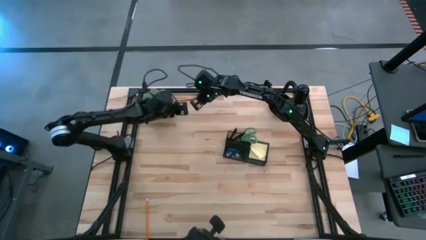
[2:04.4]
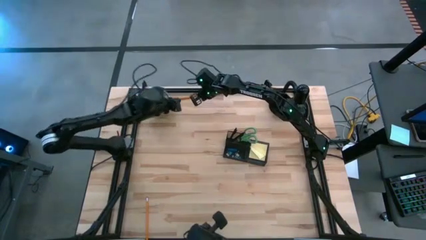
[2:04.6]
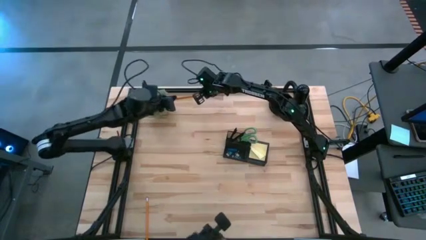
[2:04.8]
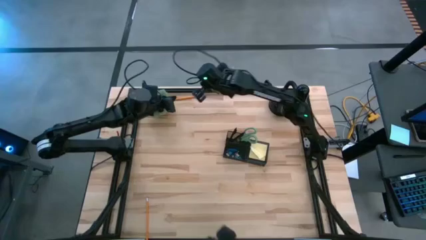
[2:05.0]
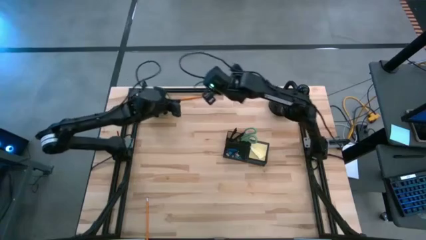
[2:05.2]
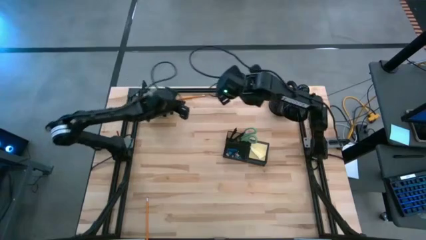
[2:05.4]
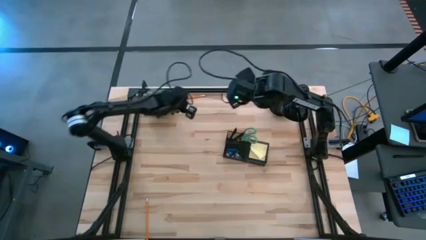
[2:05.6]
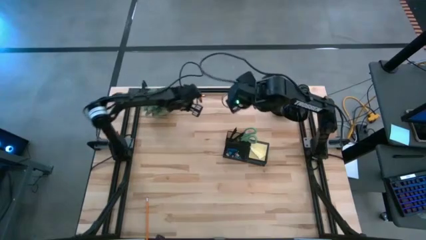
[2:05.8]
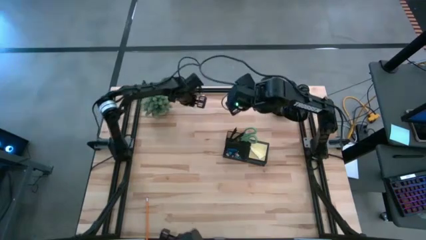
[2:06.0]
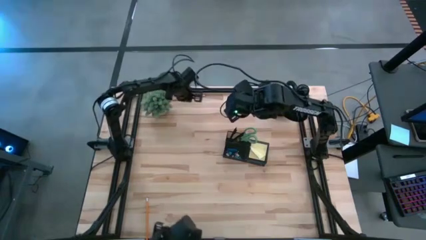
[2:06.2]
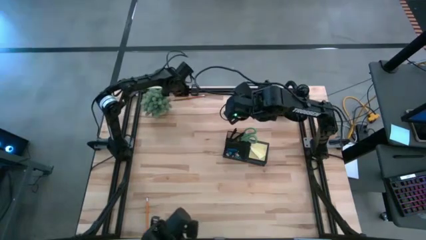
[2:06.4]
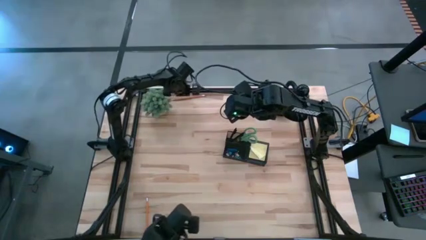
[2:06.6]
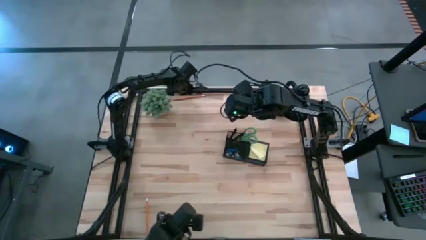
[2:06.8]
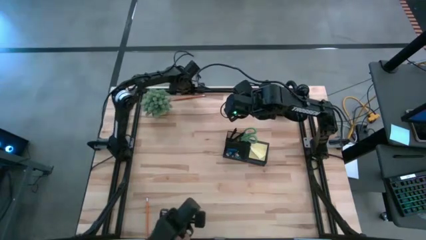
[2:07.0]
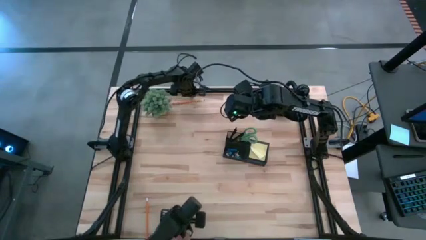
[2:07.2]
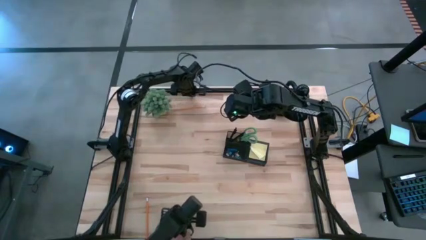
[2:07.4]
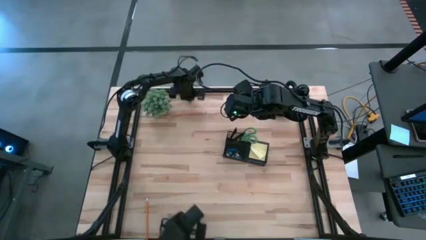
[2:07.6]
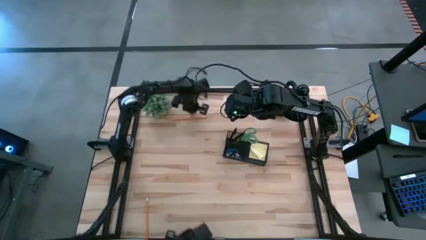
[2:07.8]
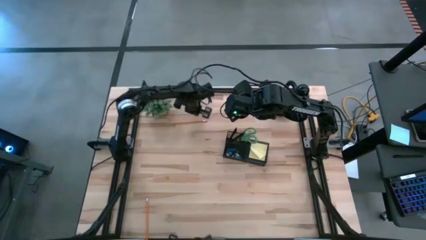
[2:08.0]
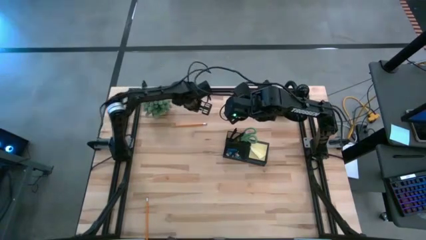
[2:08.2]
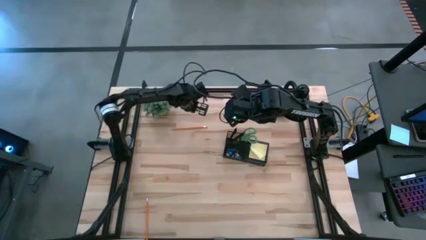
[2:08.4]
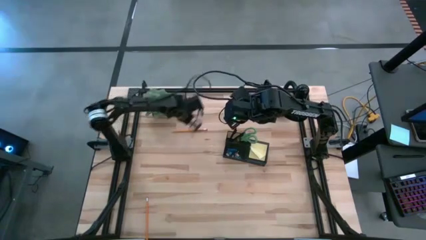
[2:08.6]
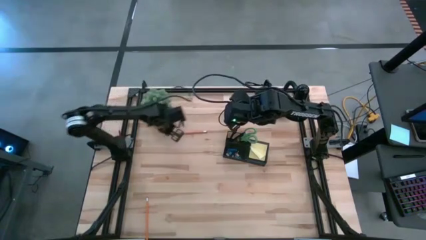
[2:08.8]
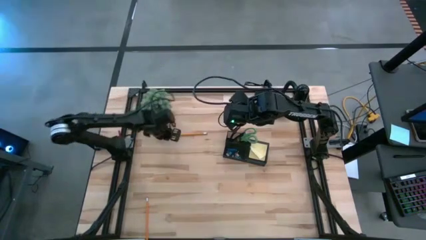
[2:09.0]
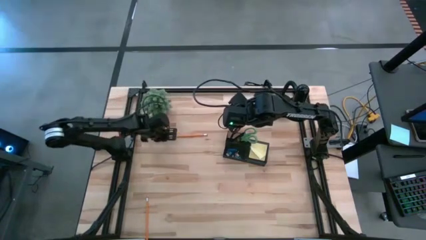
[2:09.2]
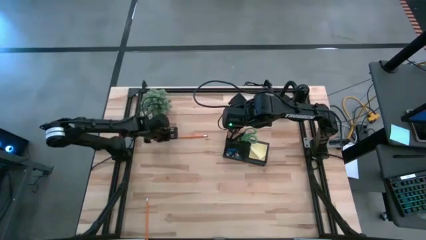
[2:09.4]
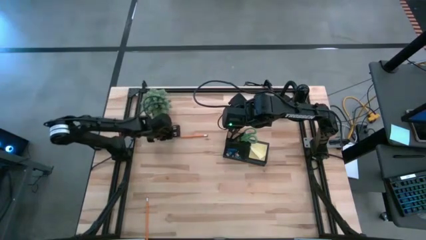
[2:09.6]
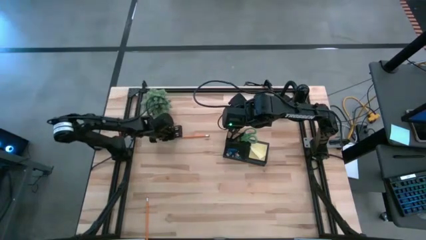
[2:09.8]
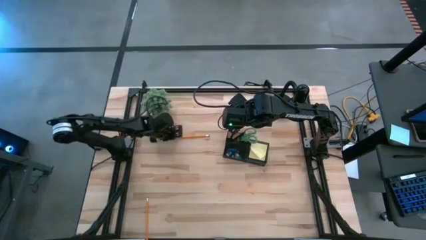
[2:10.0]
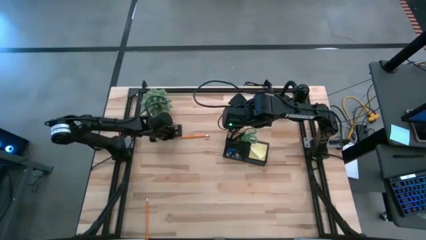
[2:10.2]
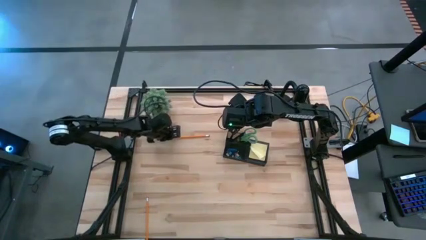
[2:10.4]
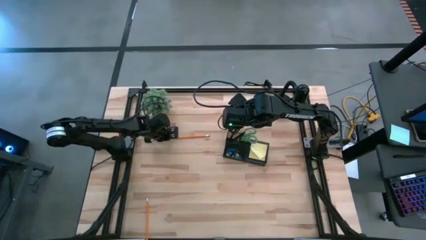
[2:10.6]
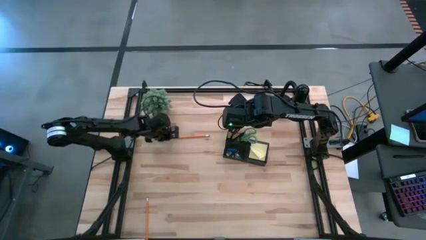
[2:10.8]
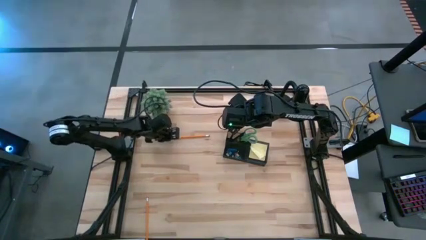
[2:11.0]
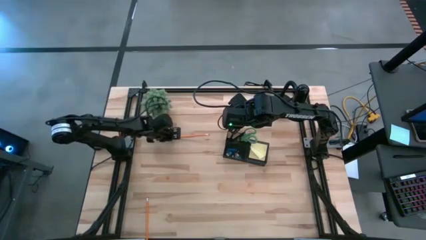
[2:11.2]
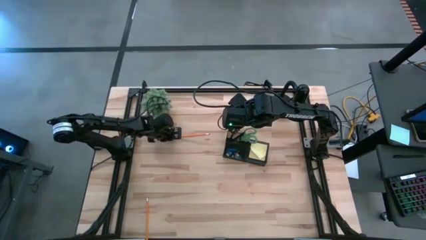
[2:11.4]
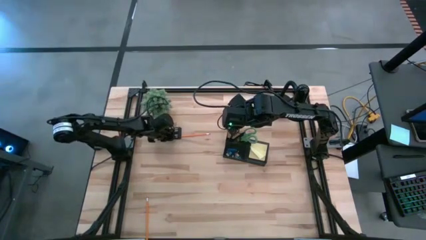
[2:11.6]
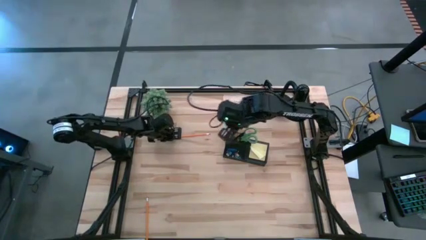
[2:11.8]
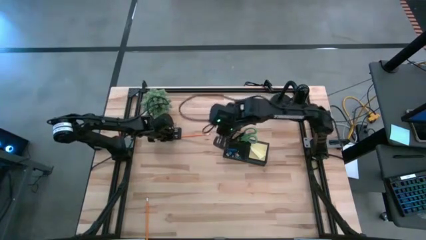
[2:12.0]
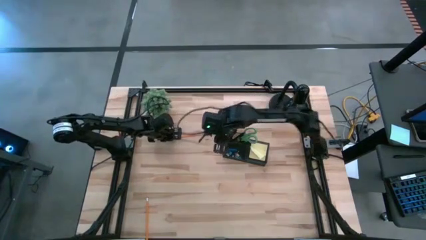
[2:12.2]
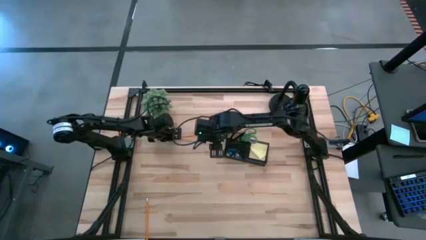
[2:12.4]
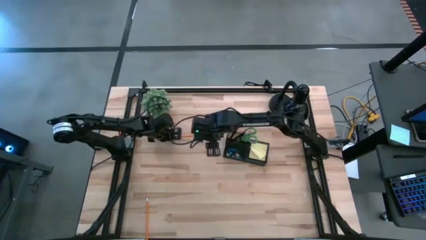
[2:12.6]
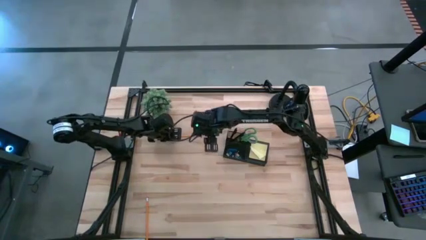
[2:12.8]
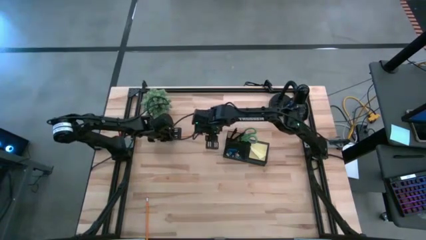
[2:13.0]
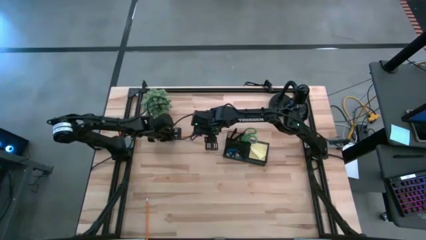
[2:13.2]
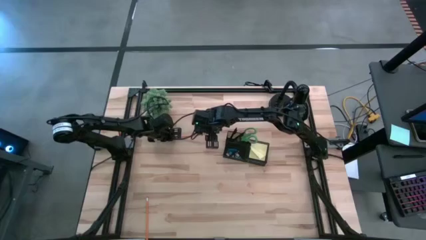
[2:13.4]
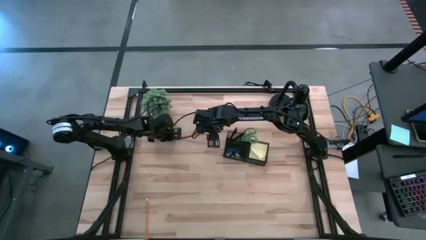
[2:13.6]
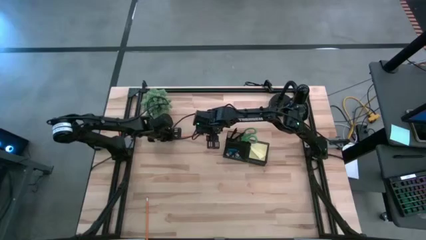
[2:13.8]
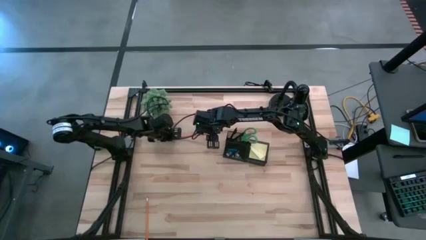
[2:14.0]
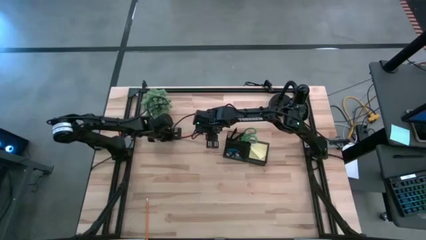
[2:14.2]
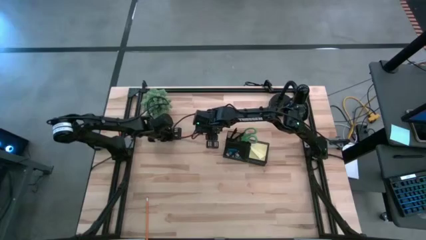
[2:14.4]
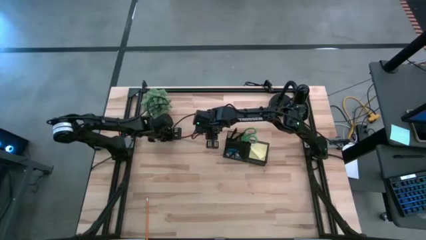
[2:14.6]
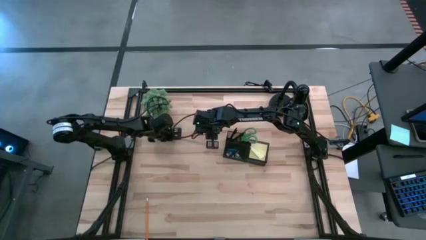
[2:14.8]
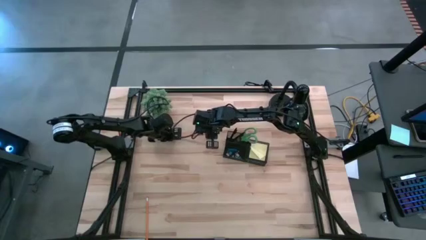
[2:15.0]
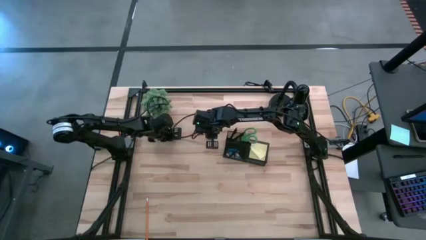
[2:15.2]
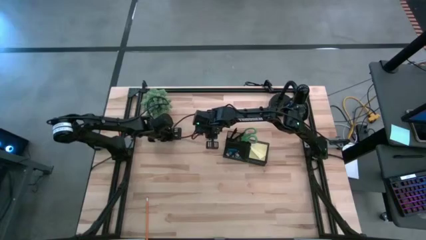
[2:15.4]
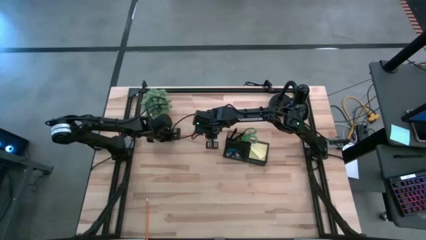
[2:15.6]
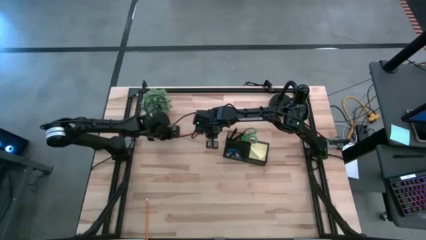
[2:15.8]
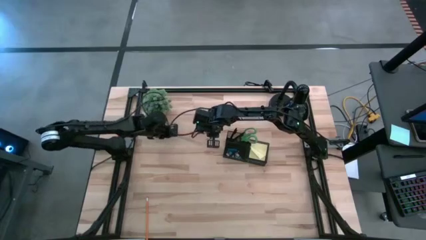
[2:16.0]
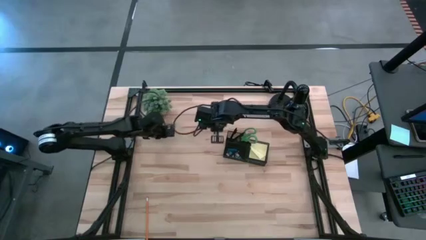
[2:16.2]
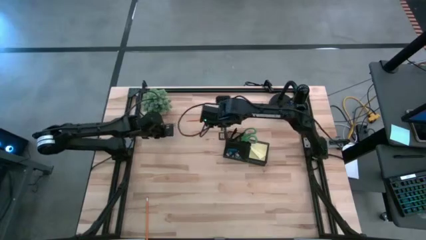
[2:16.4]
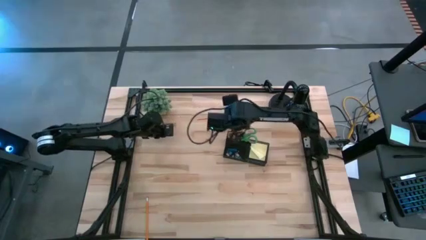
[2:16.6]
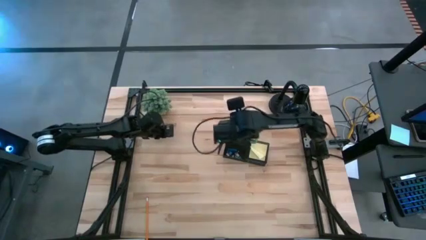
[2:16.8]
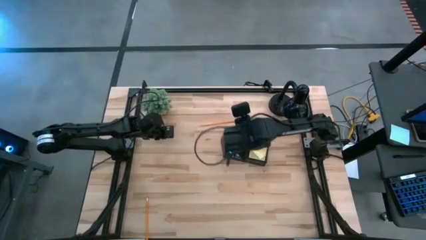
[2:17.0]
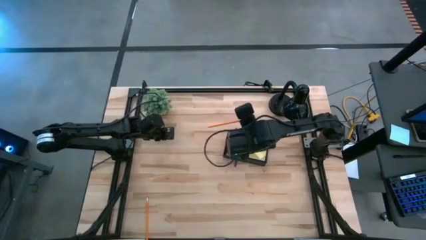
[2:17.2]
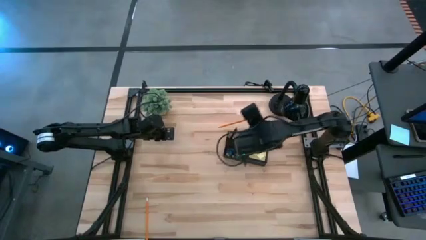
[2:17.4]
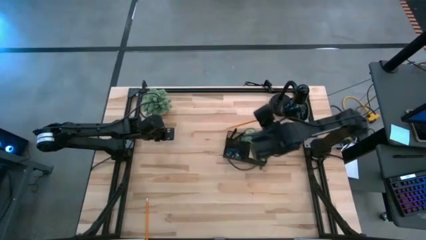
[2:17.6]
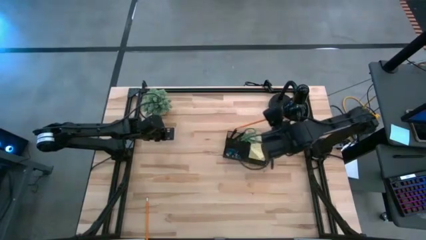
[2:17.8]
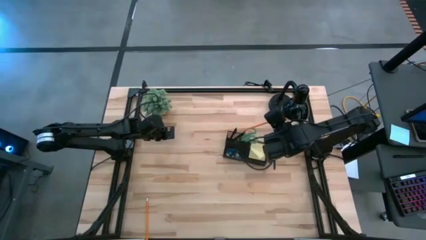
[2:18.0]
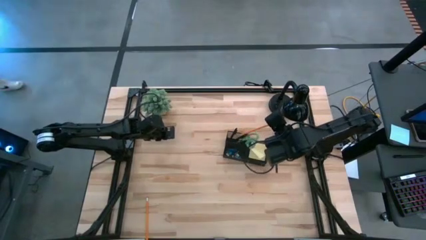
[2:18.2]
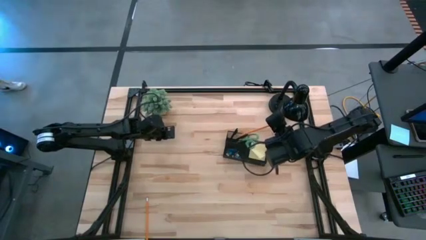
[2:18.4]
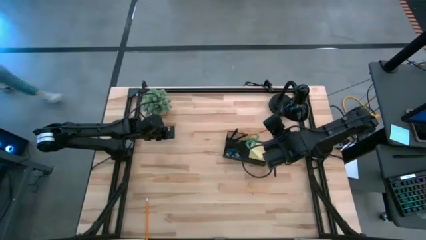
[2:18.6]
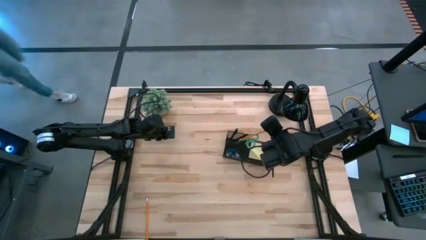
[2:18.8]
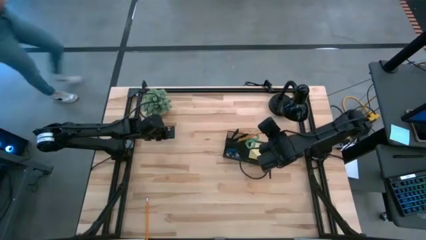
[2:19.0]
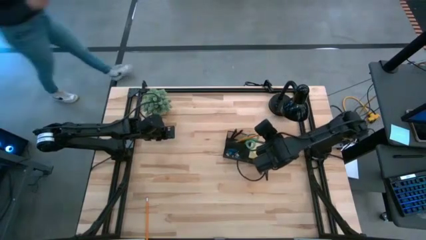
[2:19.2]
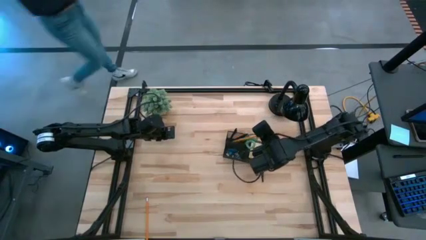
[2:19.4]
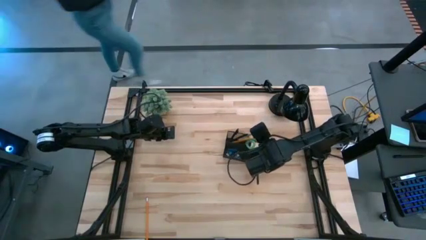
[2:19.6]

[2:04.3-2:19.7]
Task: Pick and place office supplies into organizer
Put the right orange pencil into the black mesh organizer
